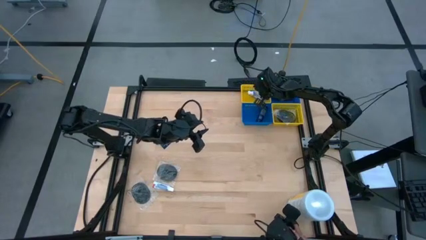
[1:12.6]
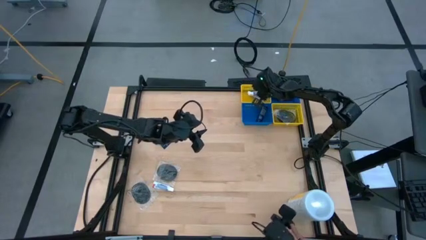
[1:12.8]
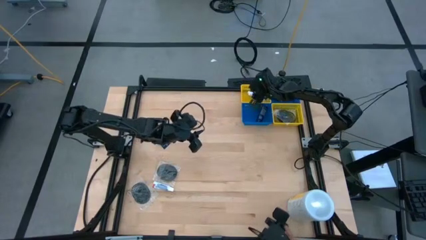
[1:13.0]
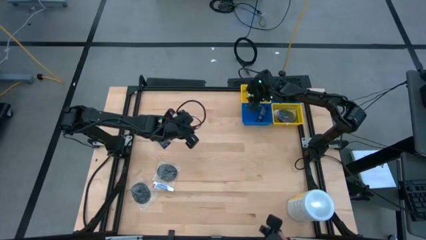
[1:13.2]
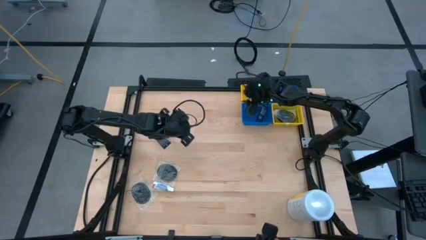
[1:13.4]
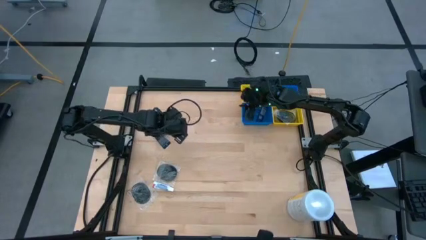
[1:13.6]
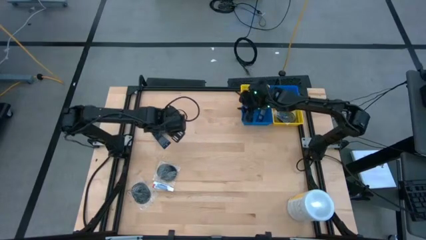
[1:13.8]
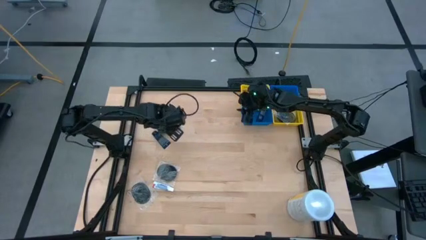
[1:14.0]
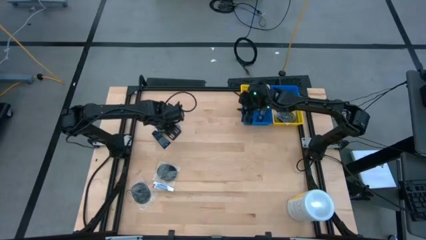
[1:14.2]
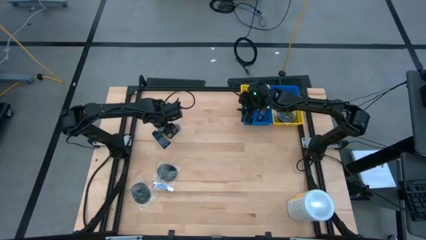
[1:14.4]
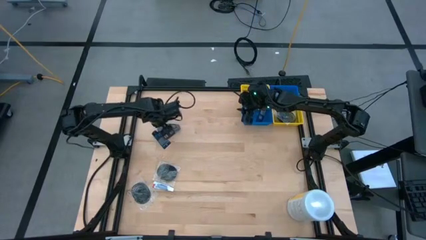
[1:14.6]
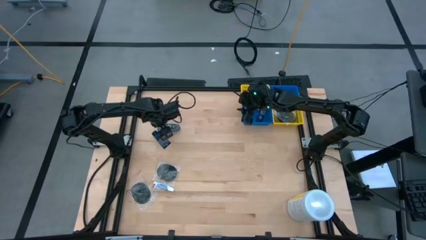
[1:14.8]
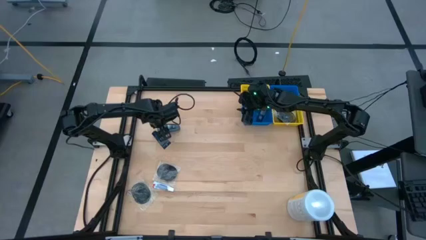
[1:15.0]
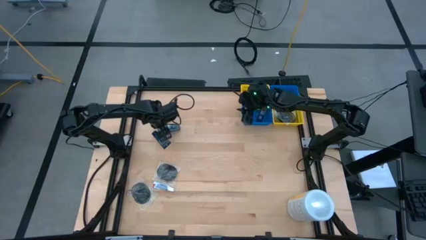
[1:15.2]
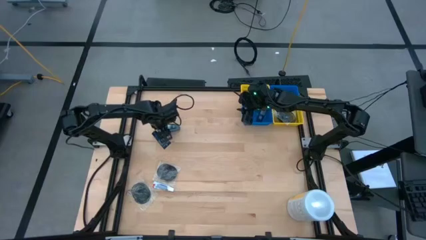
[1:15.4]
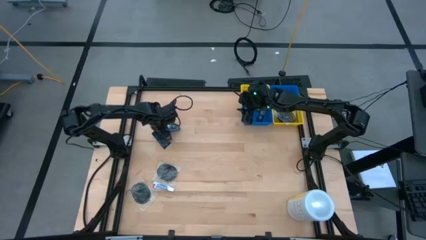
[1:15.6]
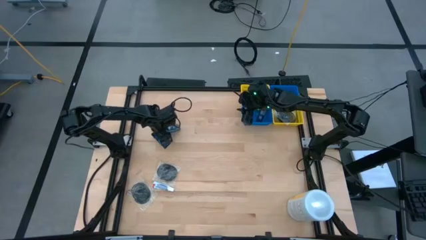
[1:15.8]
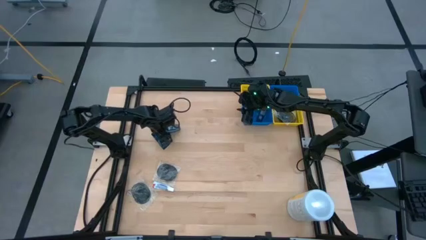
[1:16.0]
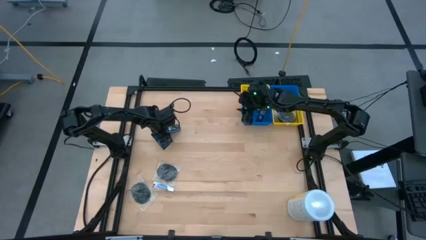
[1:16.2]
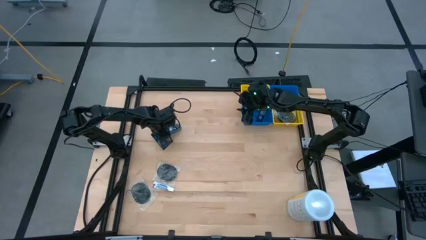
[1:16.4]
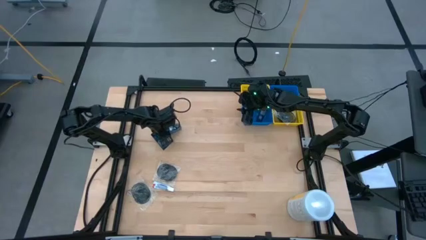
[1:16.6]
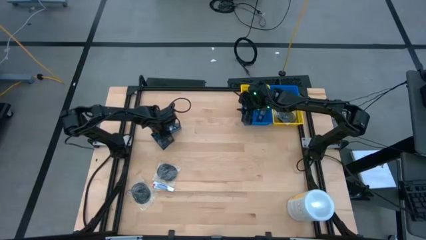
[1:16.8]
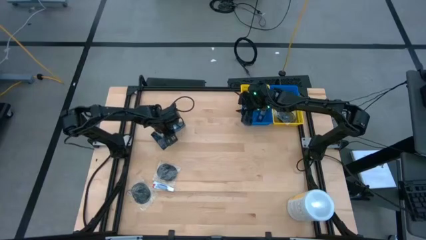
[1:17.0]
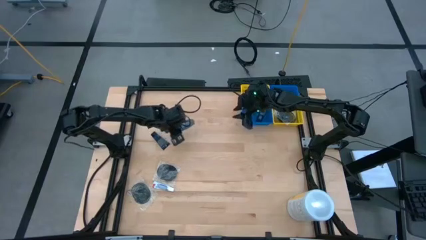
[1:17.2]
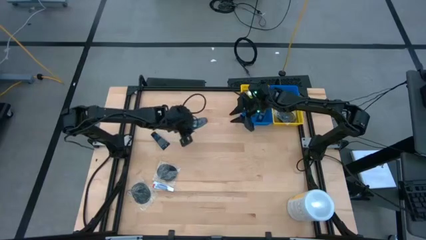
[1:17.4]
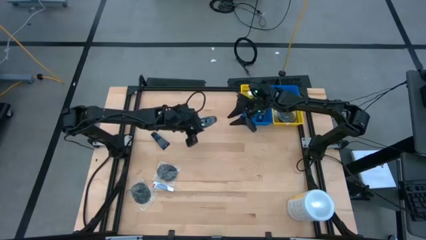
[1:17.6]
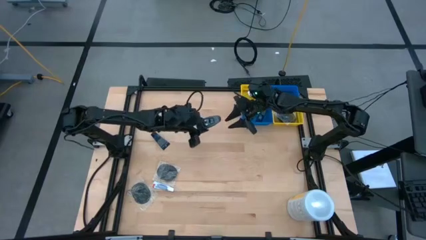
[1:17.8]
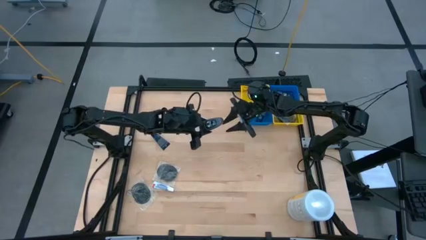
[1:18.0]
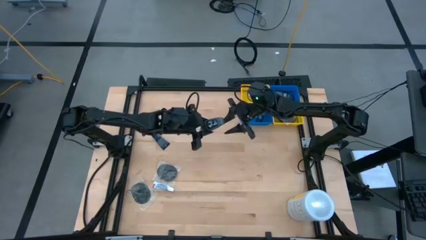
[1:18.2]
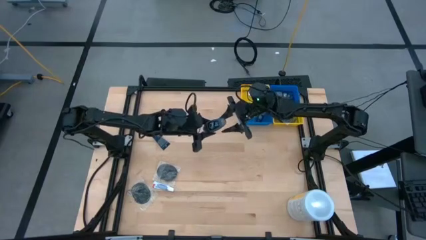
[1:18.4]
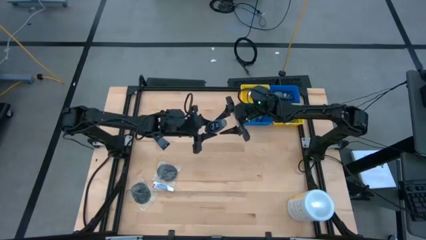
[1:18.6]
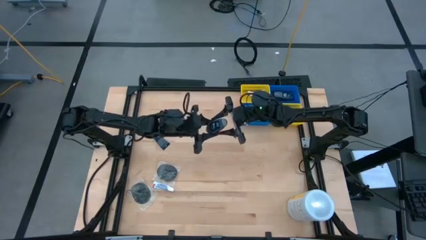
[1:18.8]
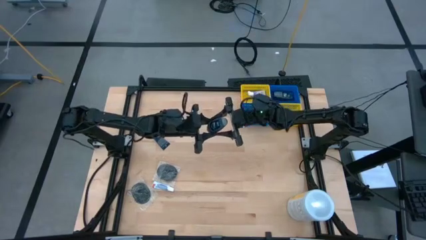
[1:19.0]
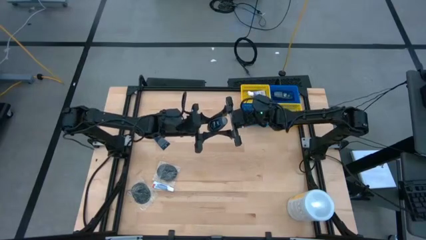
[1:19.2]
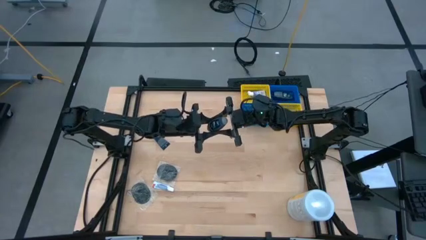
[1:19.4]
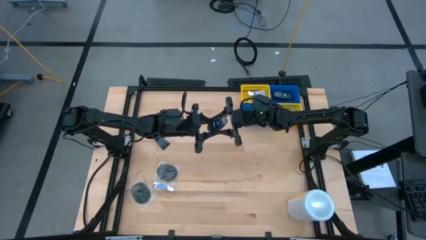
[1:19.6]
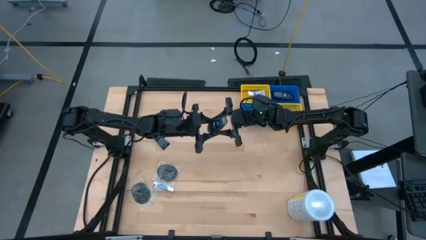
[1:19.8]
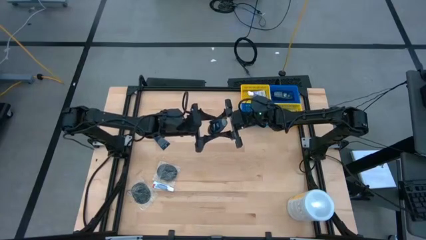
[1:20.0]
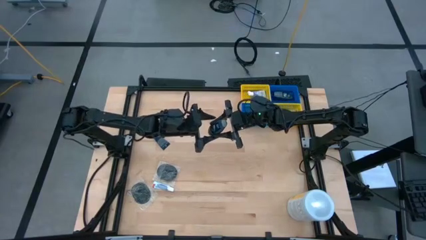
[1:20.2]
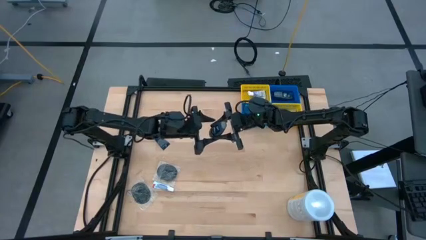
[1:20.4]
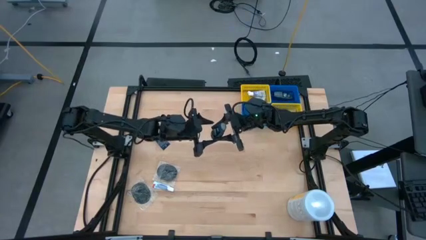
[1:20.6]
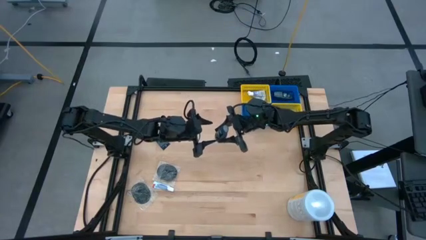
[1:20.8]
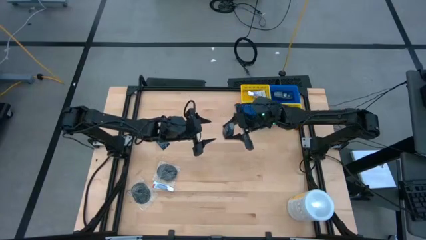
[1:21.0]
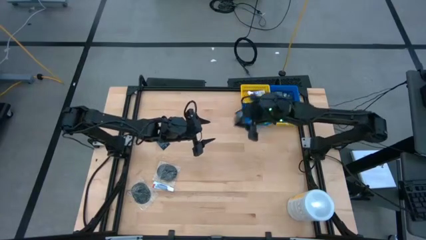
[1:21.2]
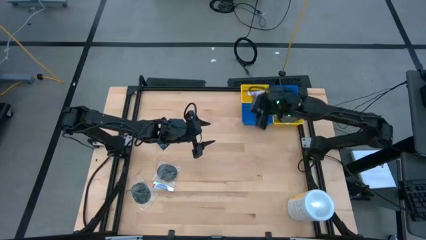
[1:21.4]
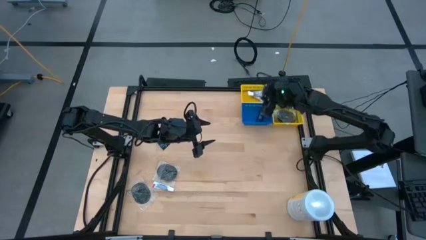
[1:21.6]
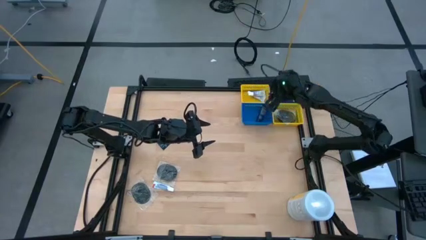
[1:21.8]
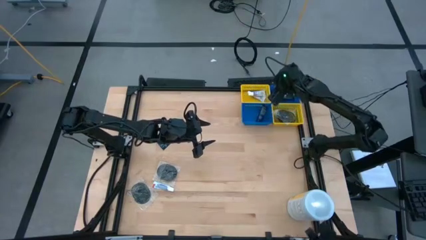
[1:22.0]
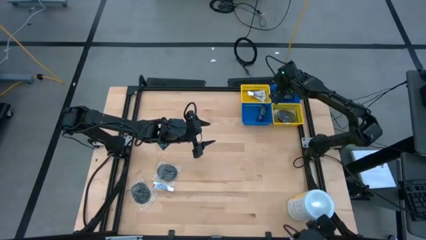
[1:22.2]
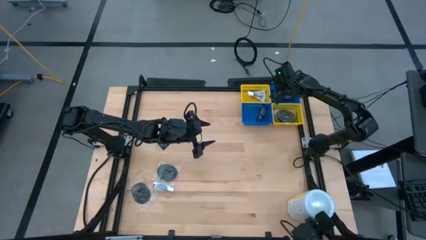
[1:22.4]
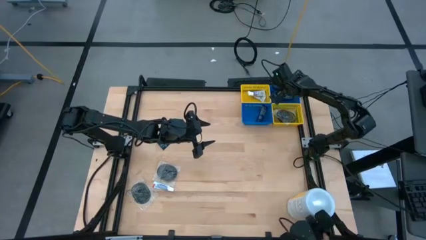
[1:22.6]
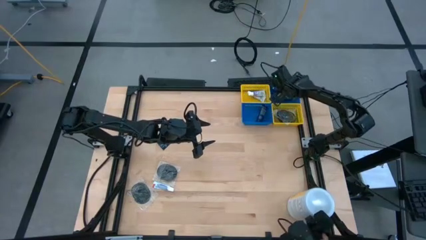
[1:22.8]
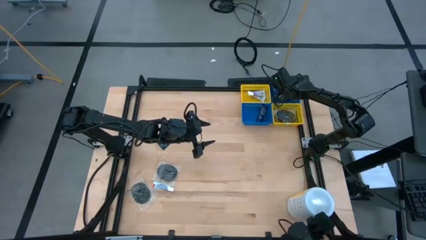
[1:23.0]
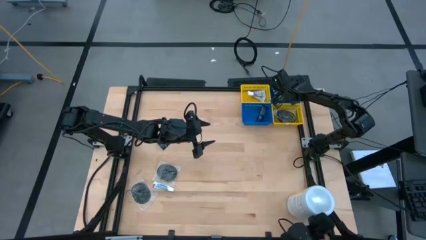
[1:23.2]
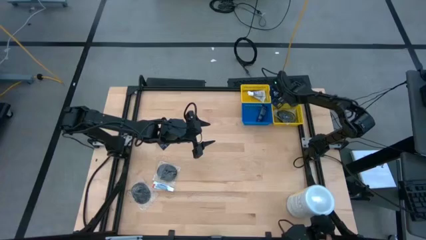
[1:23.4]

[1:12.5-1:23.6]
Task: Pick & Place Travel size toiletries
Put the gray deodorant into the top blue basket
